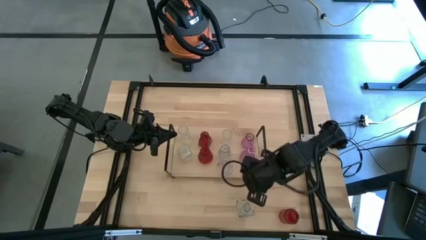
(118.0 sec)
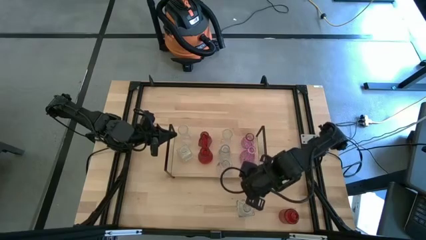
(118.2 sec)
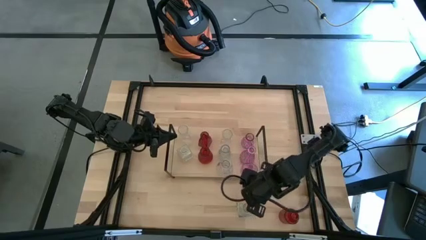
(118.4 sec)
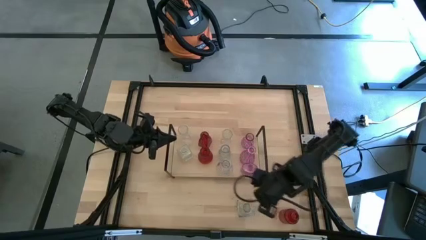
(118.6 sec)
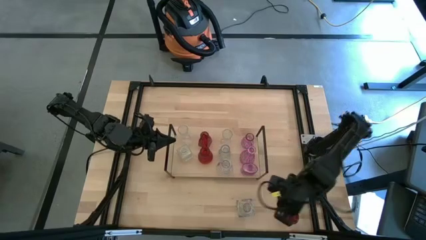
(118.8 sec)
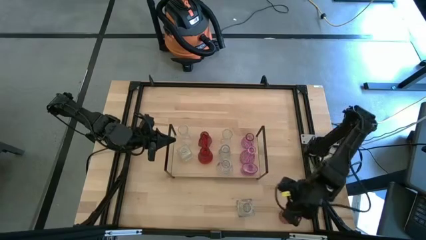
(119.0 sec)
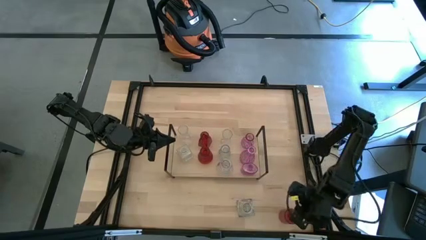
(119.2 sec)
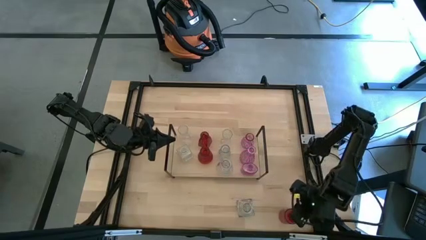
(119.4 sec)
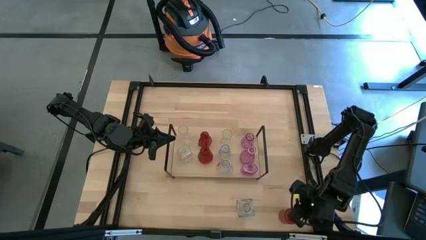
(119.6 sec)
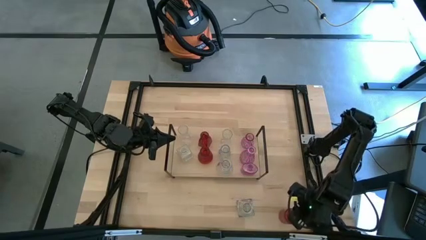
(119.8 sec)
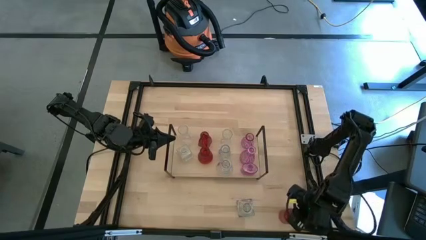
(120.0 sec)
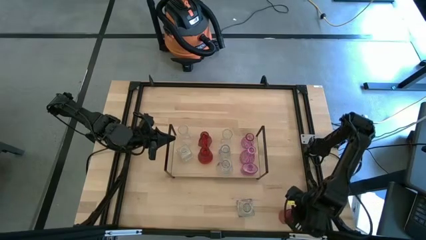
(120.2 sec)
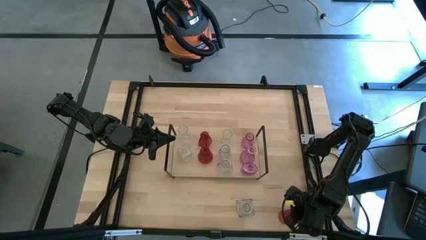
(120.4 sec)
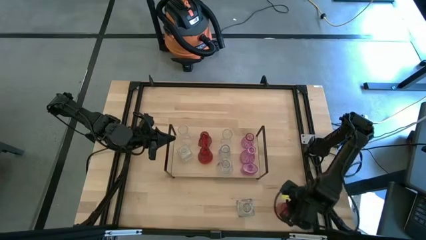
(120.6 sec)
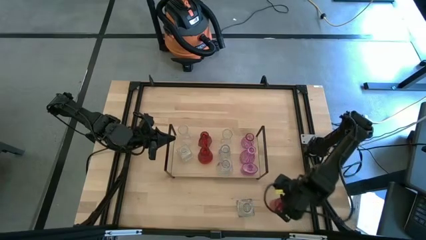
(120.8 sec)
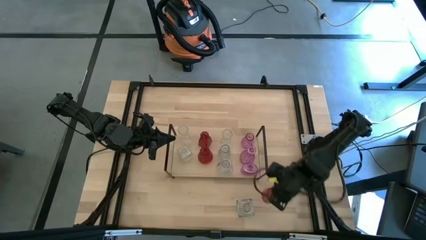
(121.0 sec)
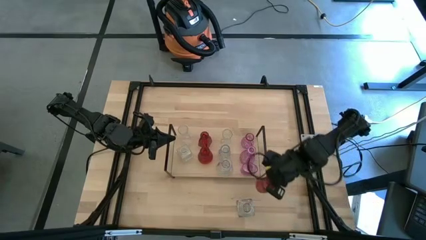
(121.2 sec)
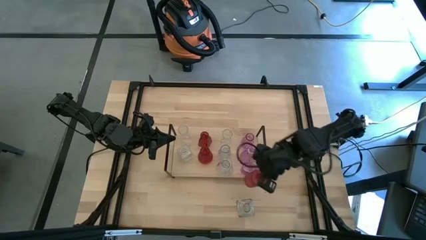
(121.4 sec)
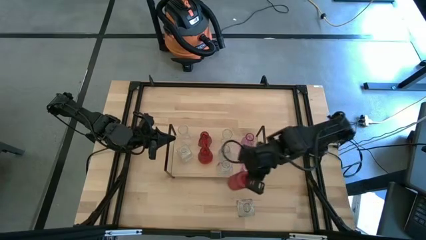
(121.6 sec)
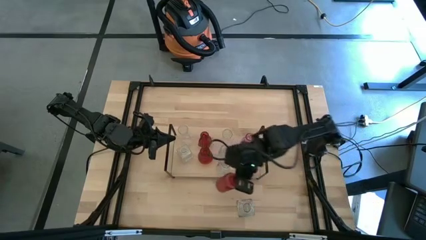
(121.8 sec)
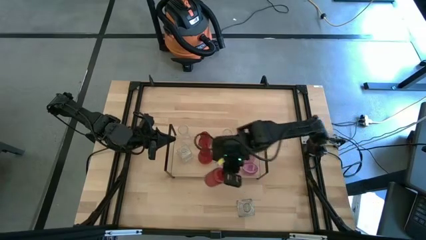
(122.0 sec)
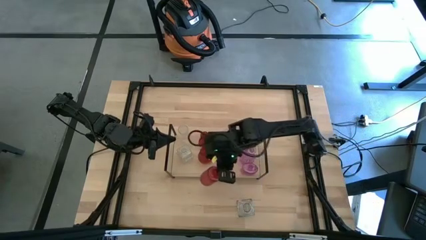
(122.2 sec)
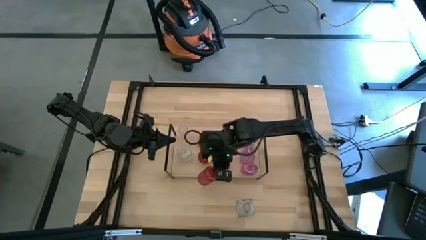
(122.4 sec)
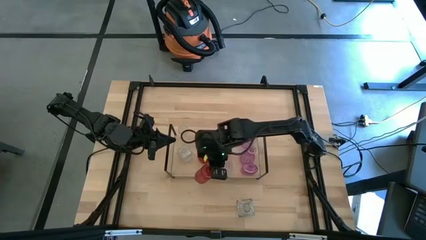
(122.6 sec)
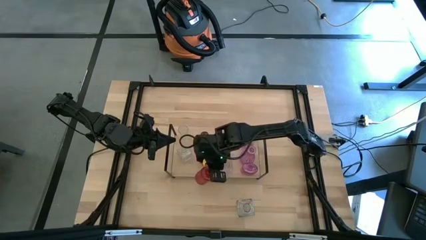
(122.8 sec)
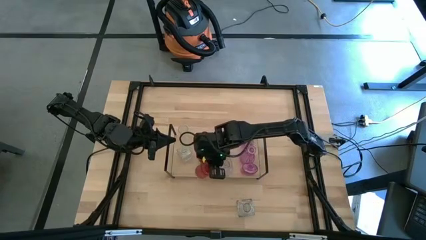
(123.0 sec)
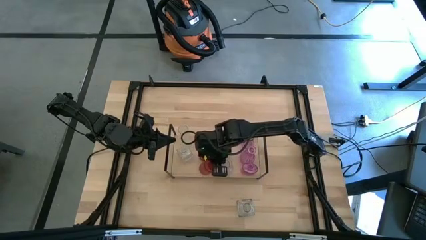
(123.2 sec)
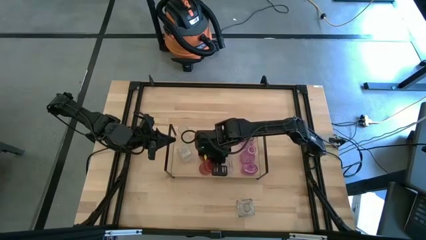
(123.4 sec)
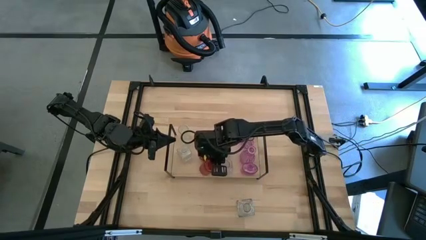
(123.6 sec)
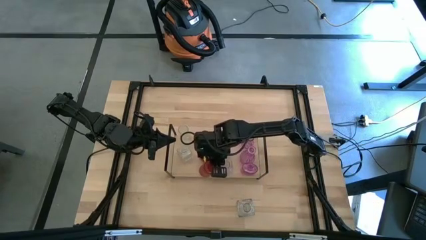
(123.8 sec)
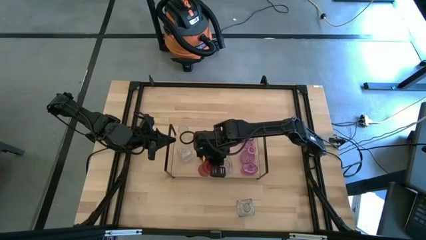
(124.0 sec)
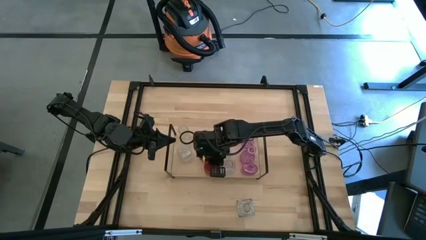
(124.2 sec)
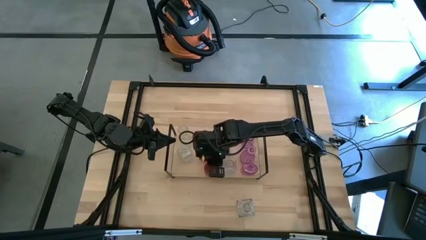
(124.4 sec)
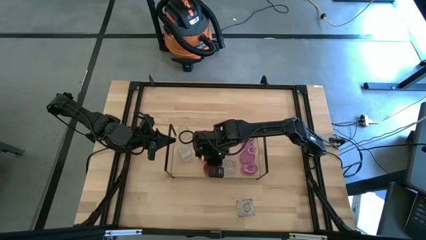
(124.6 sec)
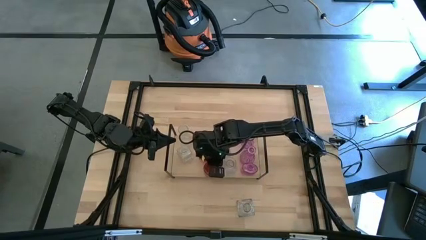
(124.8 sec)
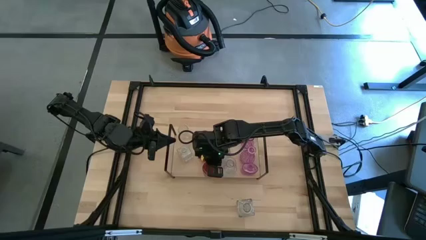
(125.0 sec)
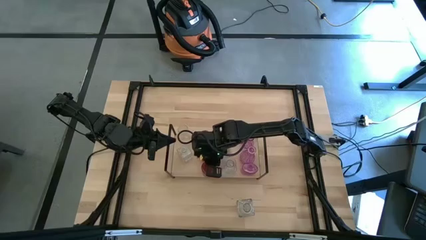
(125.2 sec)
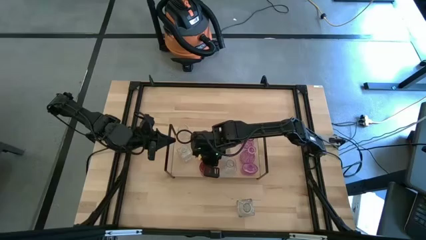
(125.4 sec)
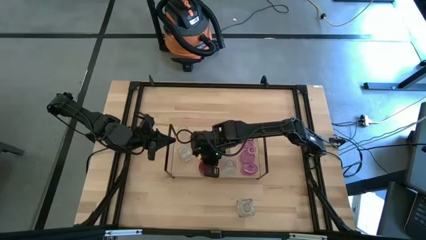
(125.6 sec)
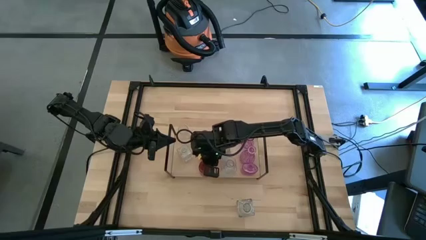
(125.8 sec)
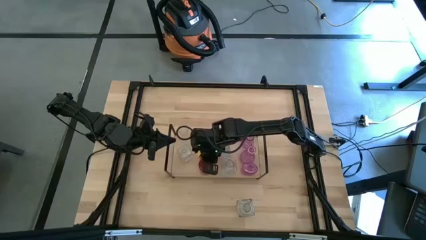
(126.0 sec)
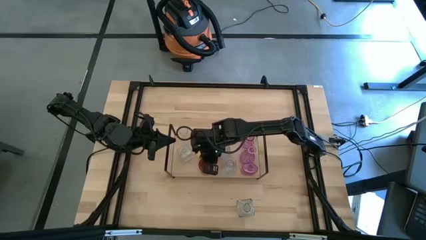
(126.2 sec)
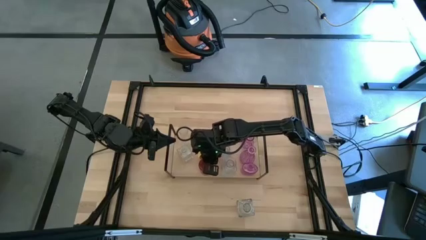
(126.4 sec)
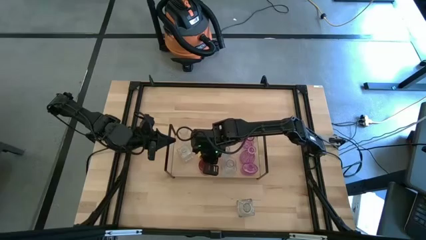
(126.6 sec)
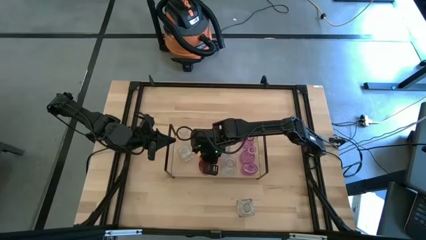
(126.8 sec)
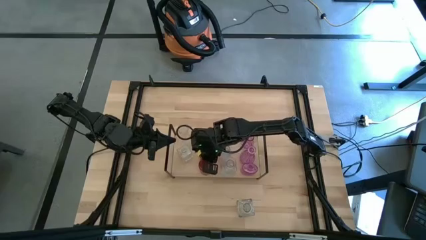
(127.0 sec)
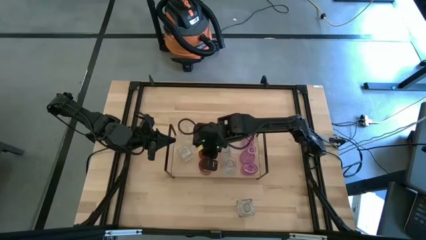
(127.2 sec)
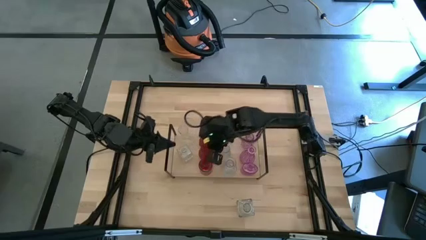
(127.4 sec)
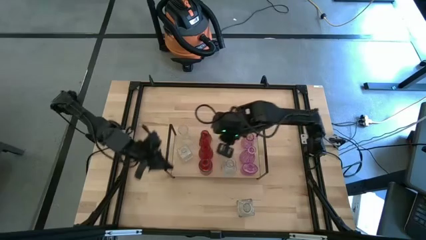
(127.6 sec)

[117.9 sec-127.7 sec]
Task: sort vases onto shelf
Put the red flower vase on the shelf aligned with the other red flower vase

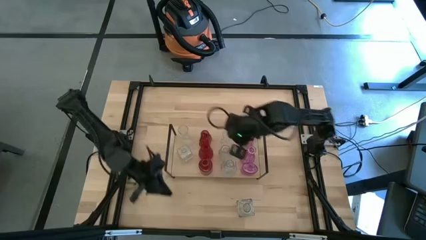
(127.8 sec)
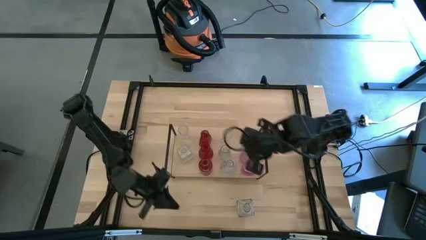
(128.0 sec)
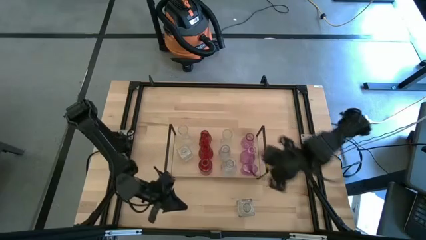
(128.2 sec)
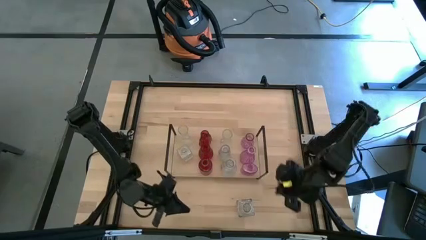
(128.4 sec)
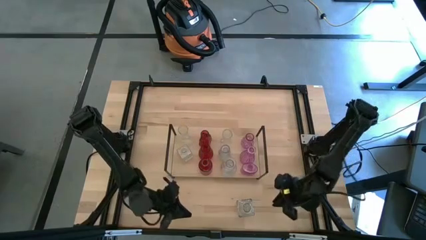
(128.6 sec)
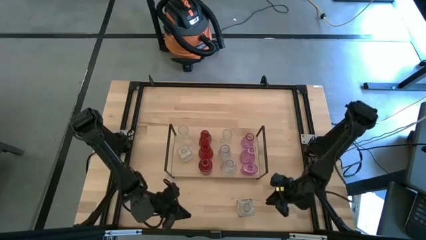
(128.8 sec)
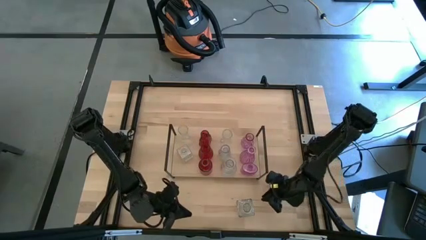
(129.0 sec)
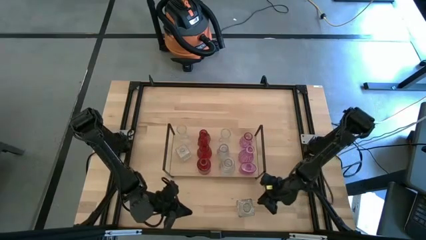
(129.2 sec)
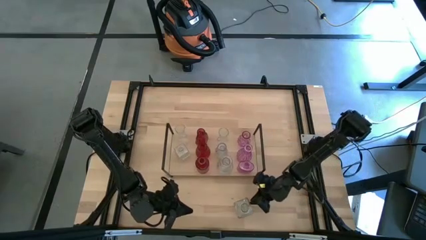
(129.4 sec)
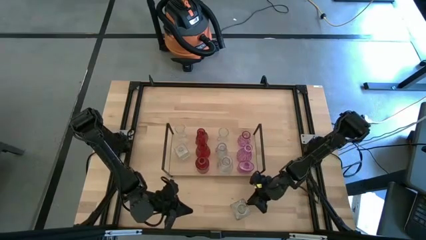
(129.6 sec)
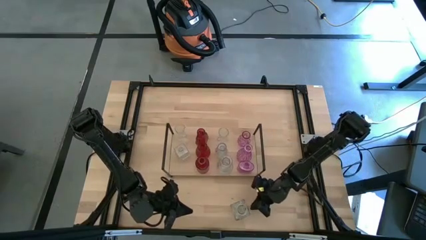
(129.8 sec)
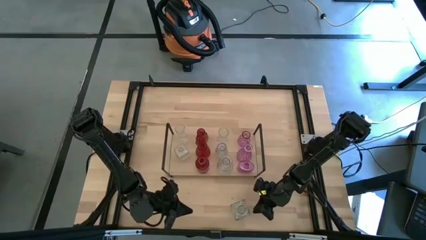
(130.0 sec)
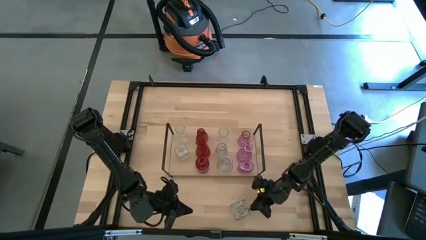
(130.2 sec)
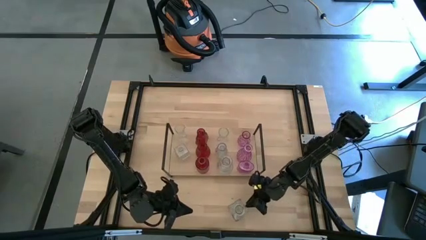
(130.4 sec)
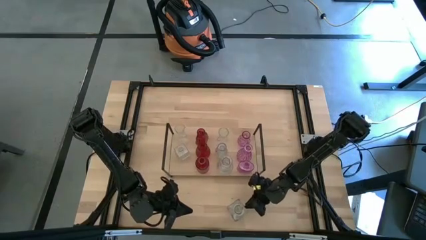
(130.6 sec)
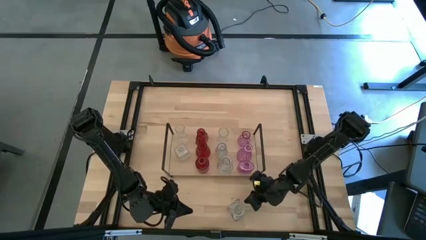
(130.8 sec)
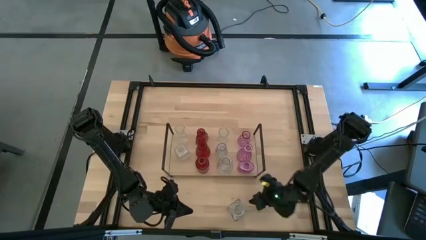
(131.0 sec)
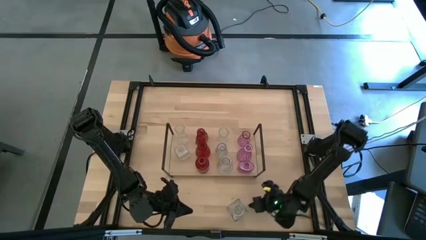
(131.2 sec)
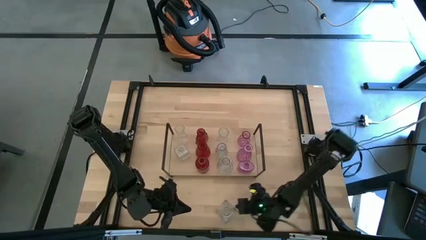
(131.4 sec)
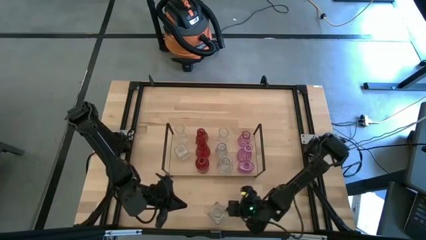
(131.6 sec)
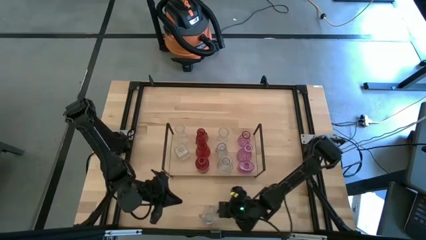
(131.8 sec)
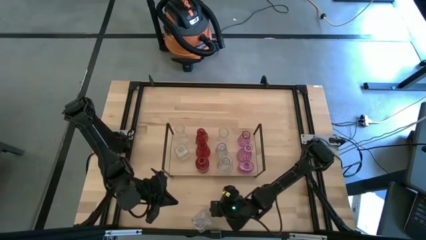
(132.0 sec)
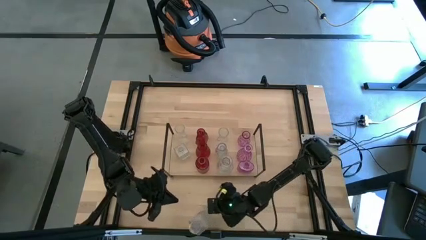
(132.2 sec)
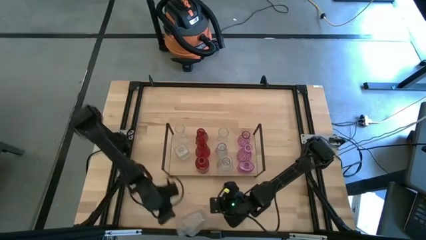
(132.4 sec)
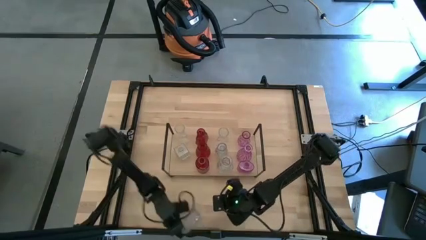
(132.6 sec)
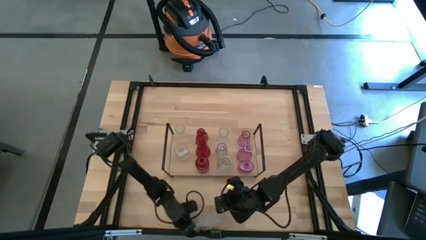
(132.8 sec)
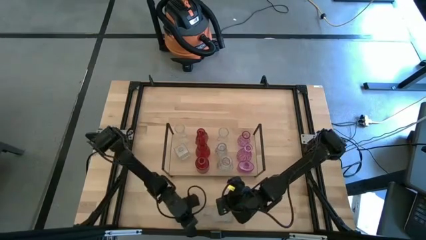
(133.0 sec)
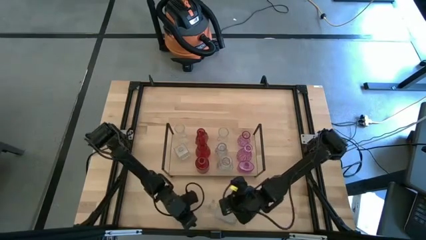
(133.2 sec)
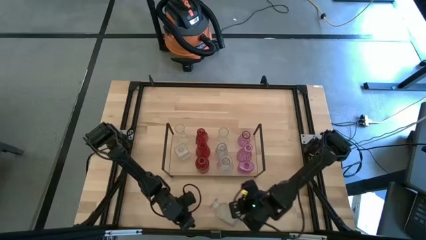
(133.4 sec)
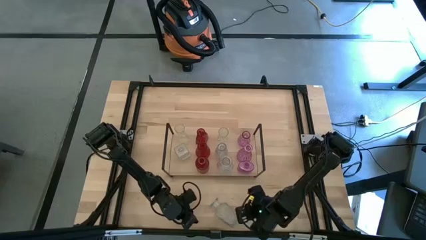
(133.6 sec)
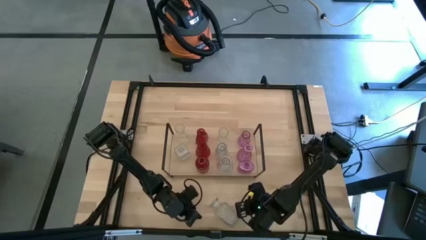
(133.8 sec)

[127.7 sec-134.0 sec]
Put the transparent flower vase on the shelf aligned with the other transparent flower vase
